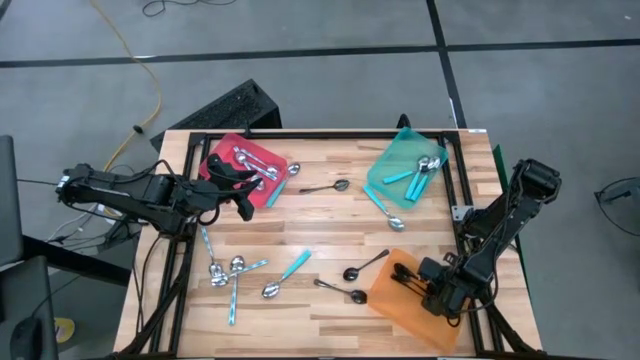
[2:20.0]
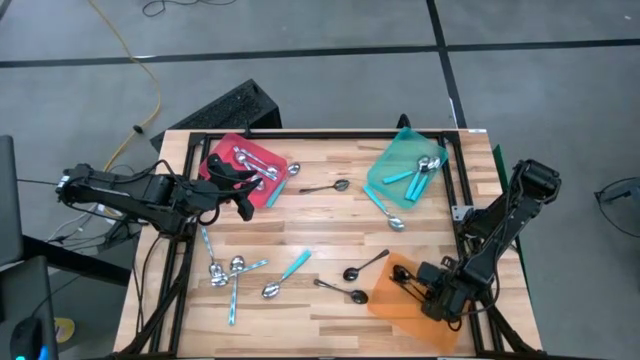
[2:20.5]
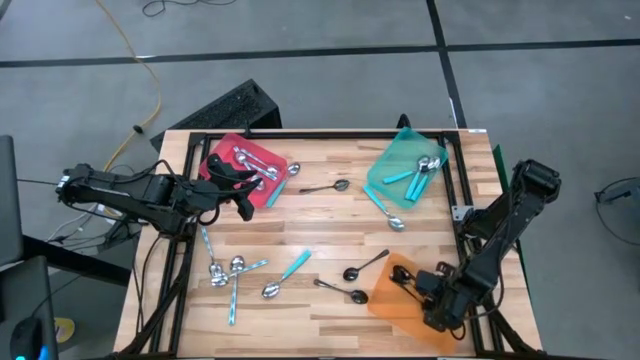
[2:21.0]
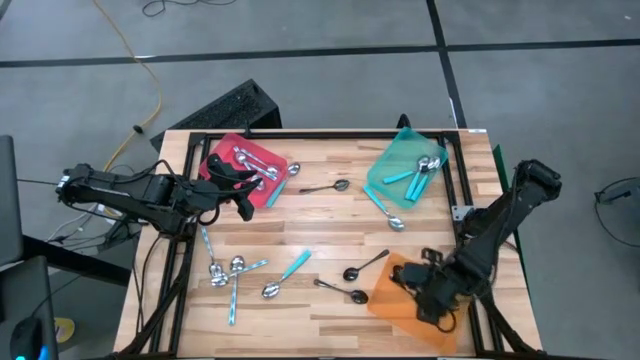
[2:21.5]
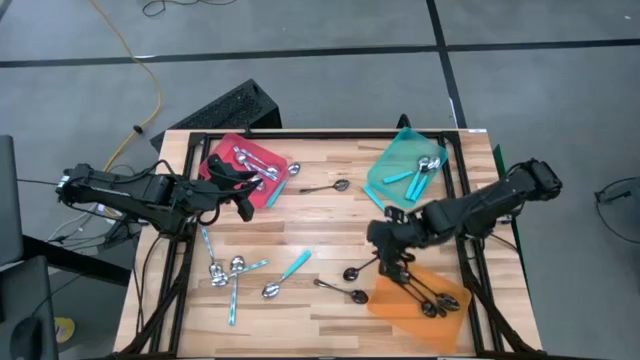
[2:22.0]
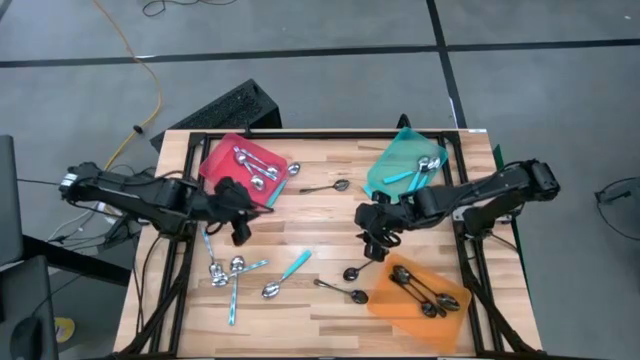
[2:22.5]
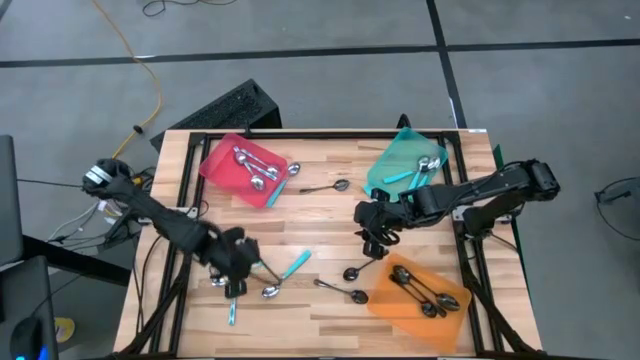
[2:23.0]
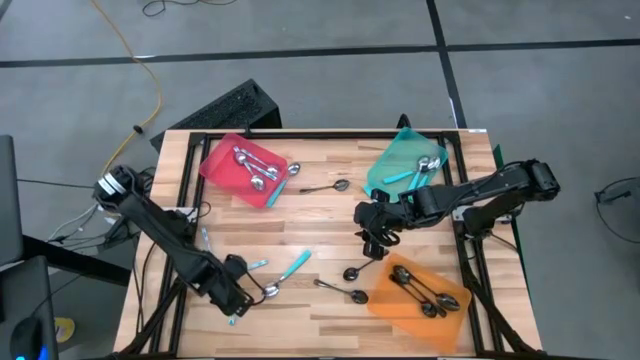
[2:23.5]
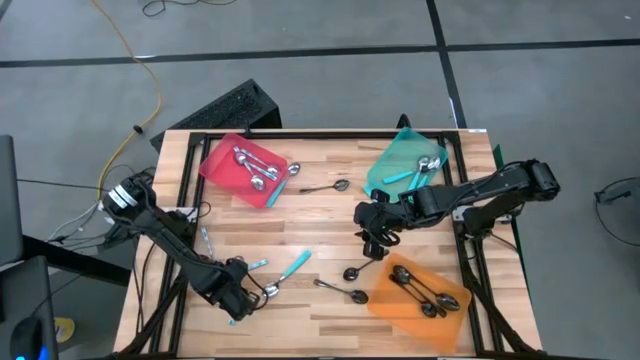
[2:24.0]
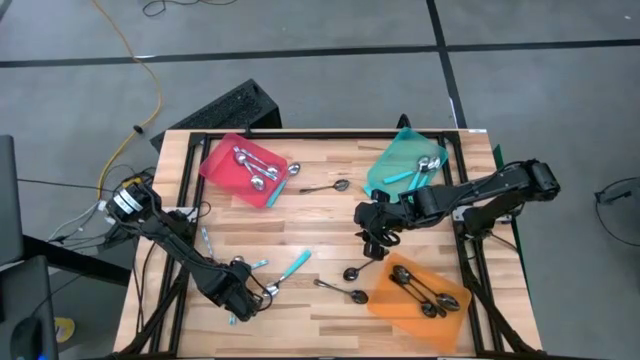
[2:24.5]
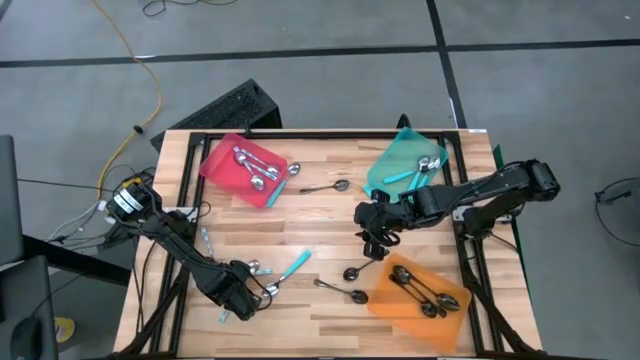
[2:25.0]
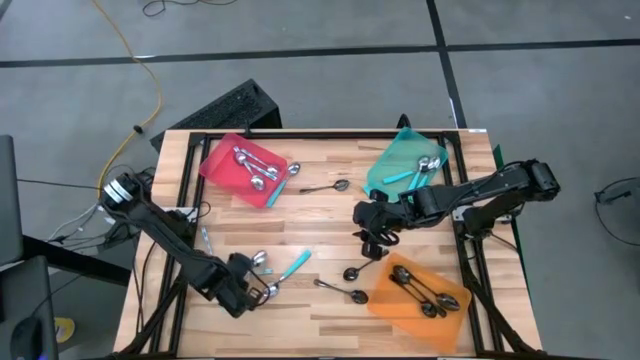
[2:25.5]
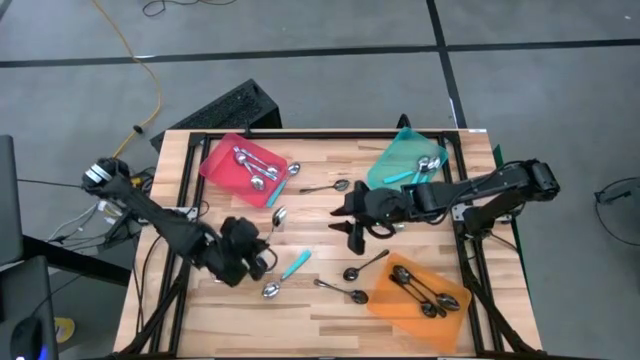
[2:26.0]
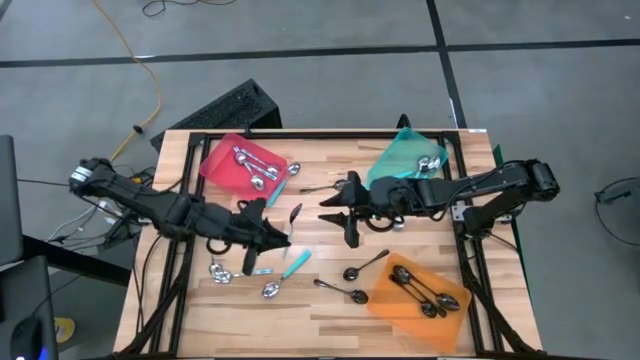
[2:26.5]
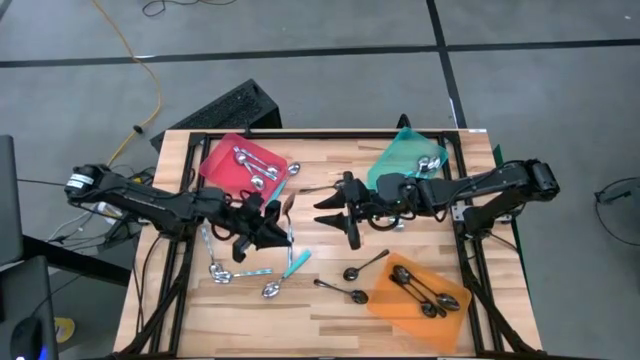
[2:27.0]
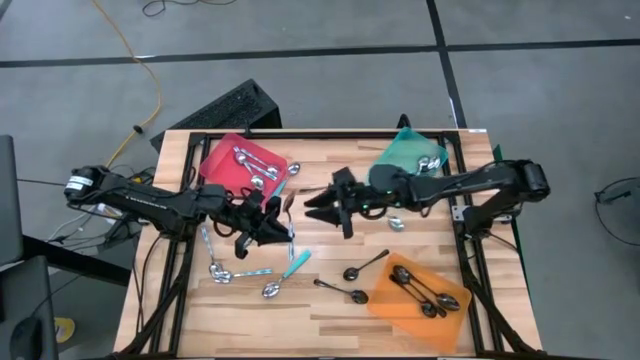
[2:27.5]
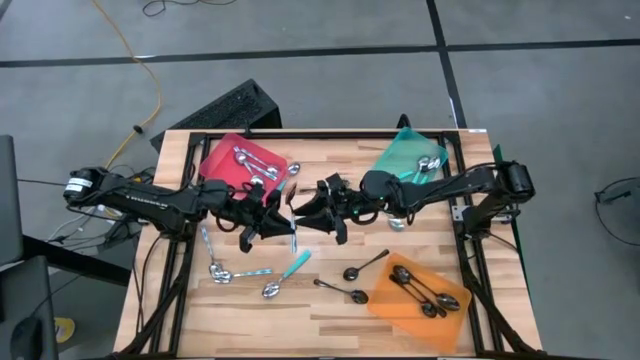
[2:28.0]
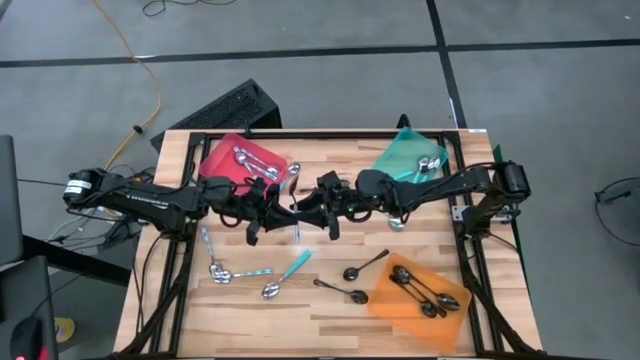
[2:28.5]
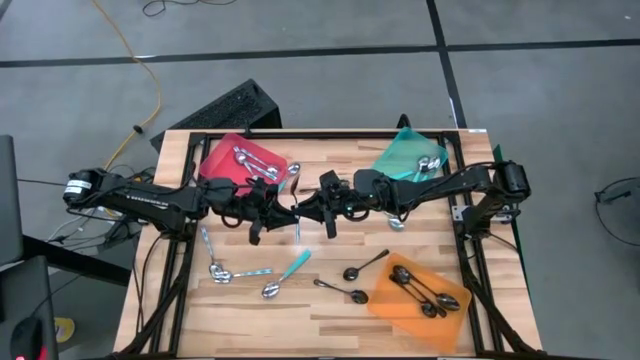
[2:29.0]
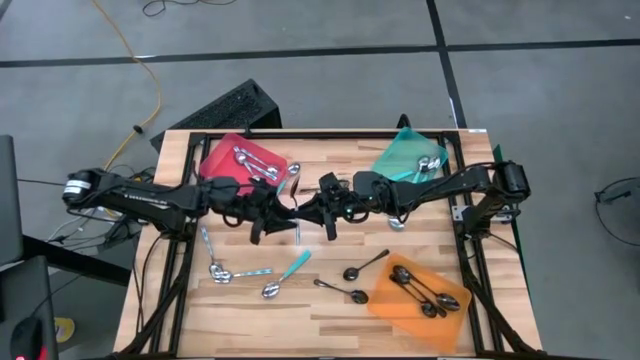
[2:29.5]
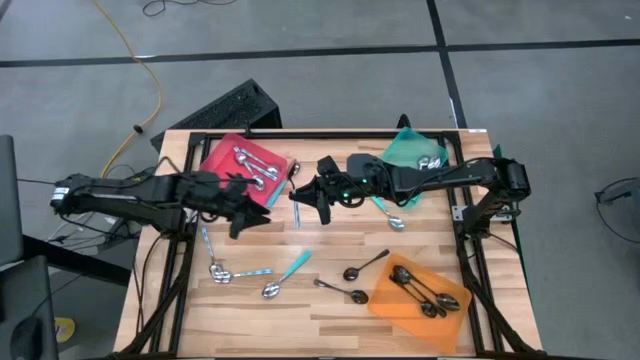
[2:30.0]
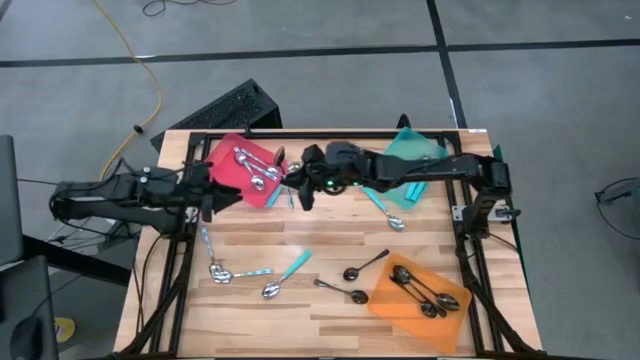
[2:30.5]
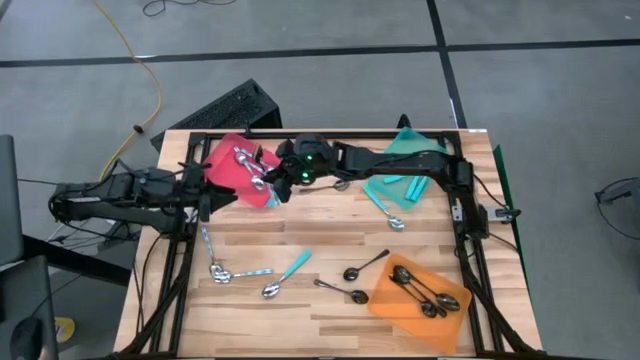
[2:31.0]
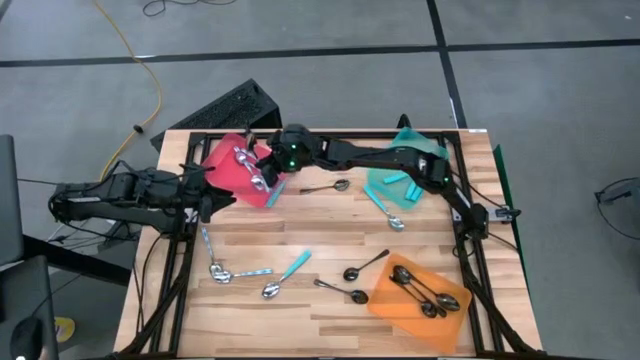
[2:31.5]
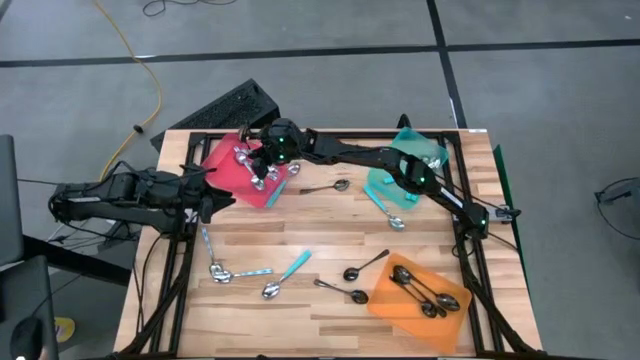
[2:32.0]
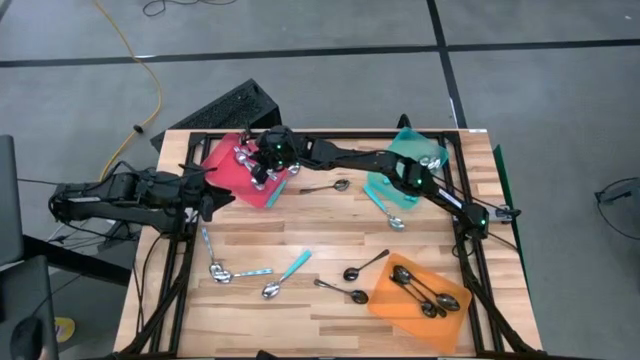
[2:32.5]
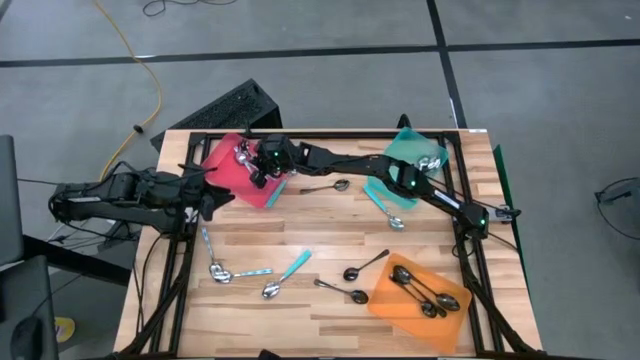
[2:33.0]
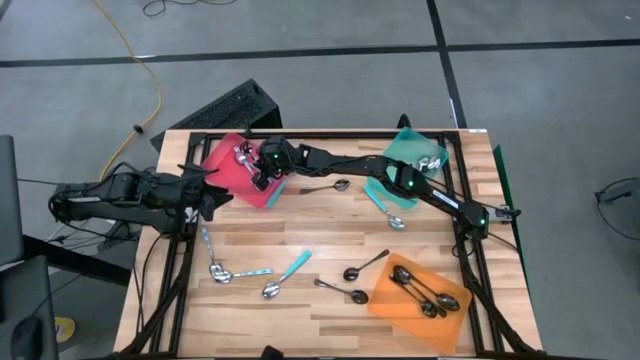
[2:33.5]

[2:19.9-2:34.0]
Task: Sort silverware by color (type)
Put the blue patterned spoon into the red bin

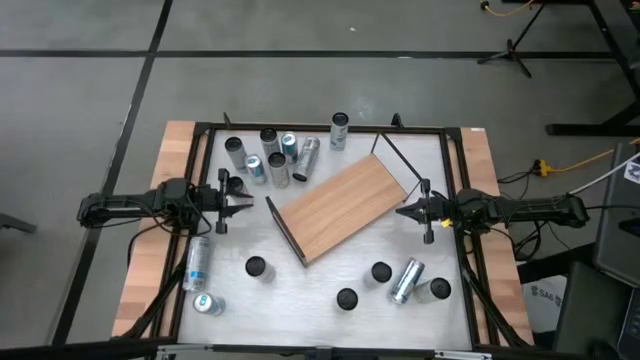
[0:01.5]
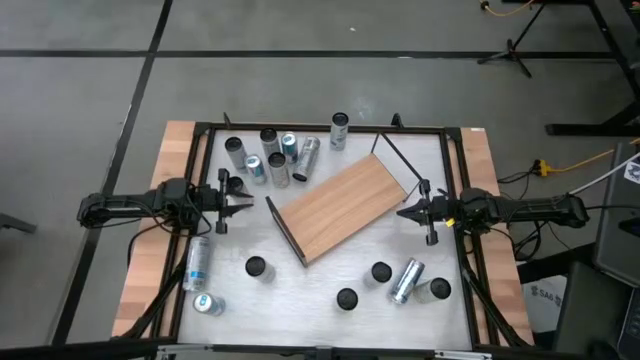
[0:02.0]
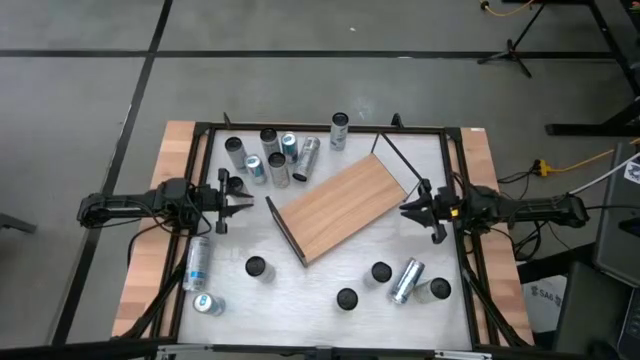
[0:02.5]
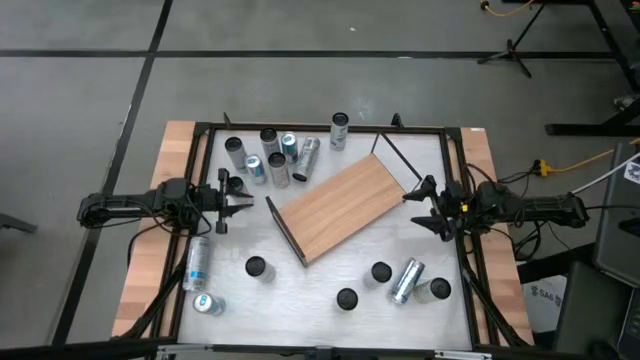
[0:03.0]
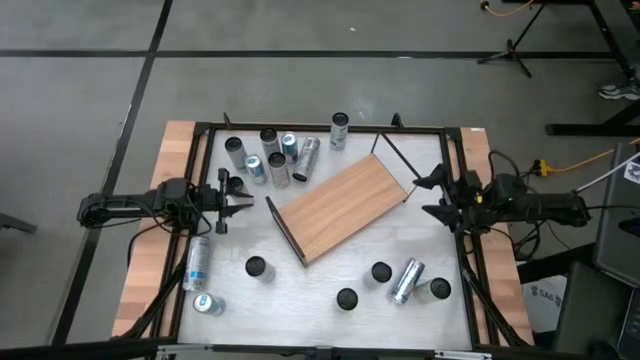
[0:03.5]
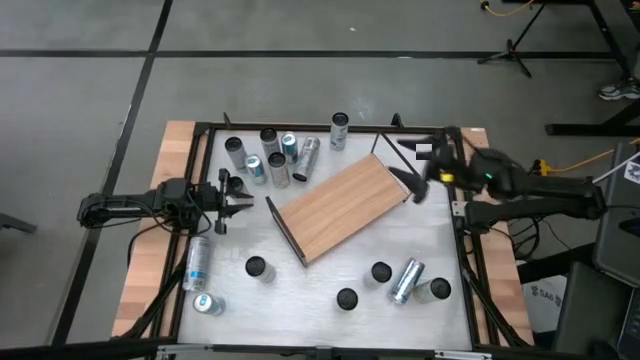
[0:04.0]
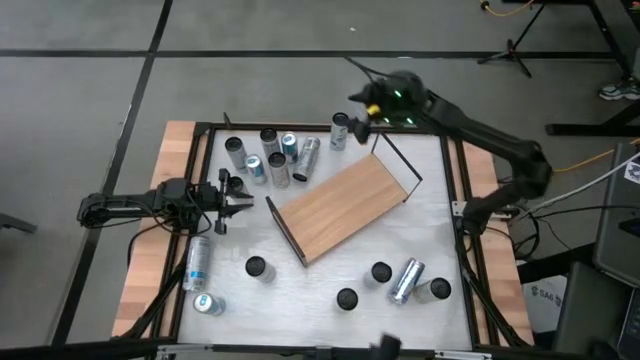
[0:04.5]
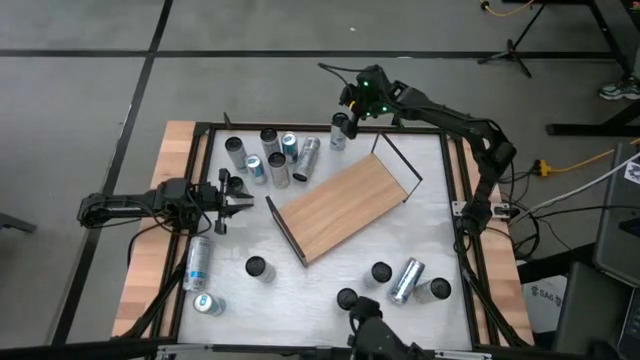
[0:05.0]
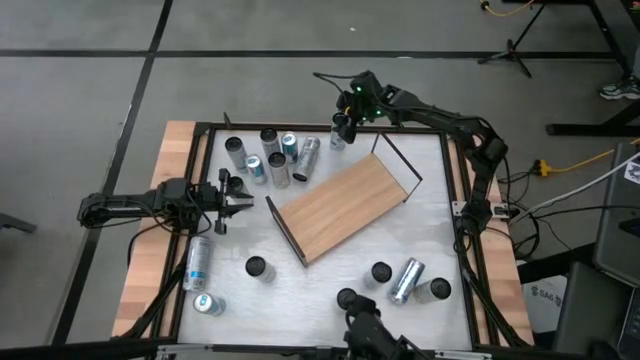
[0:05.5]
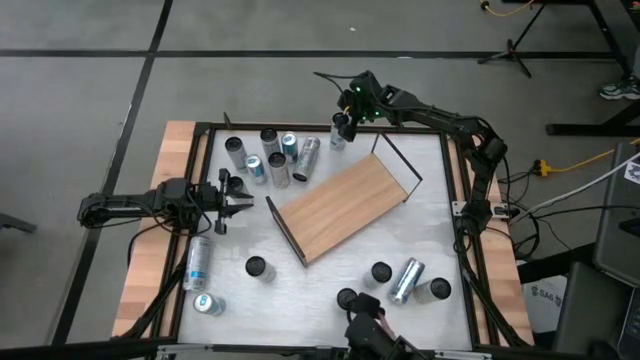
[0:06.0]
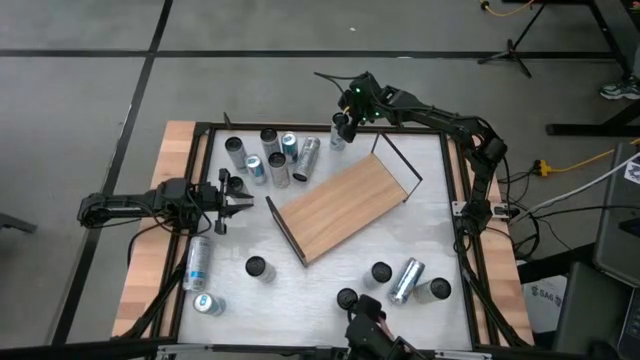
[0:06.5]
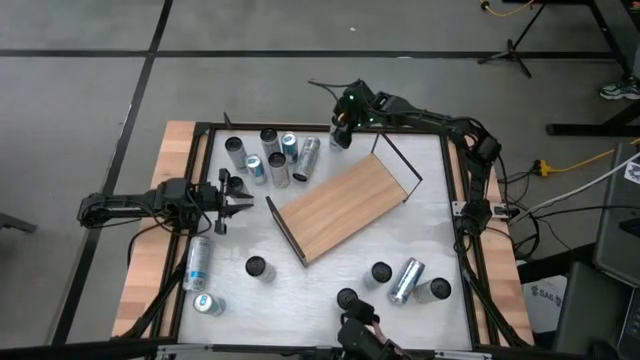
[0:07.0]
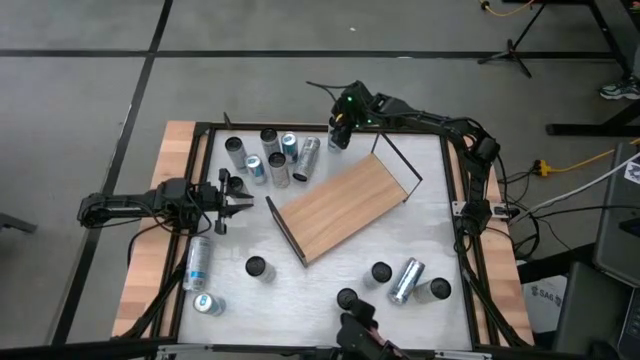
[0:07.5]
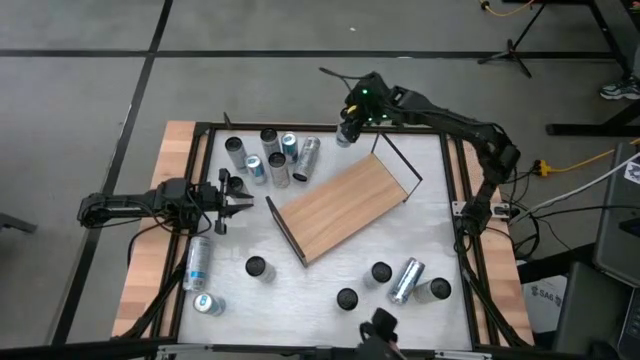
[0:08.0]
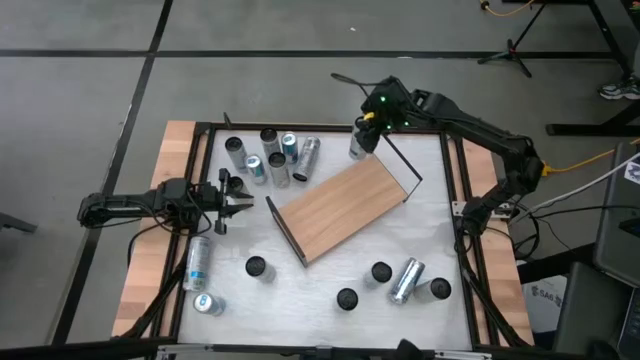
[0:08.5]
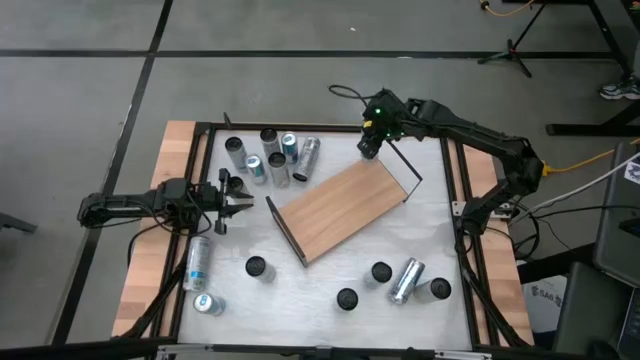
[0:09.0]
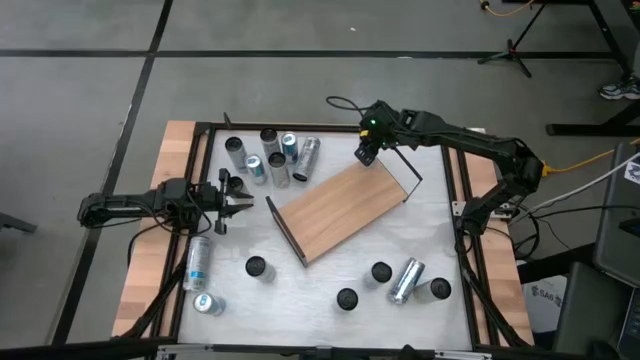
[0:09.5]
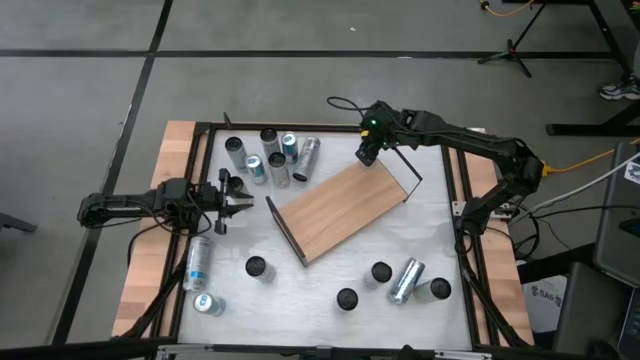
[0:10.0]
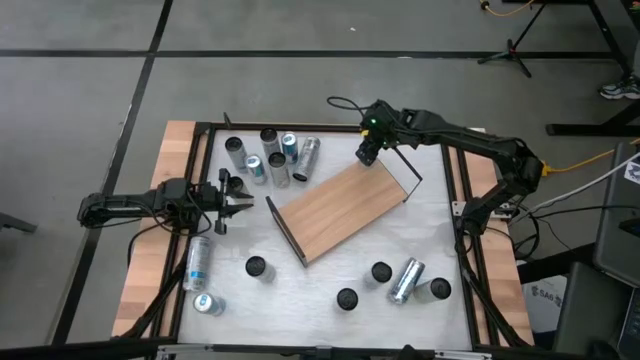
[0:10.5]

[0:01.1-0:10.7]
Task: Place canned beverage on shelf
Put the white blue soda can on the shelf
